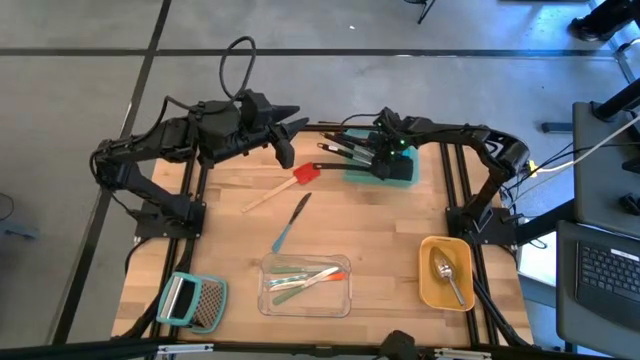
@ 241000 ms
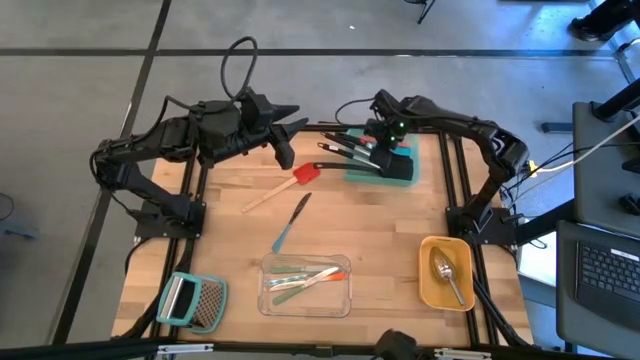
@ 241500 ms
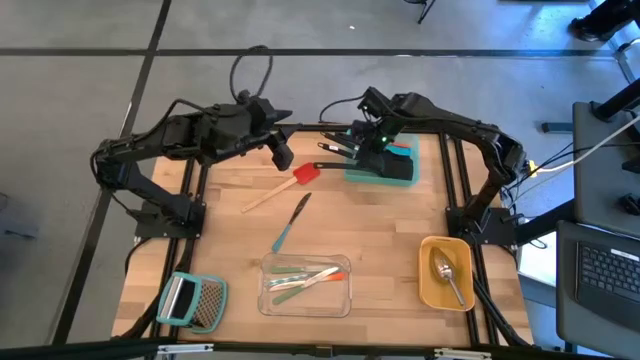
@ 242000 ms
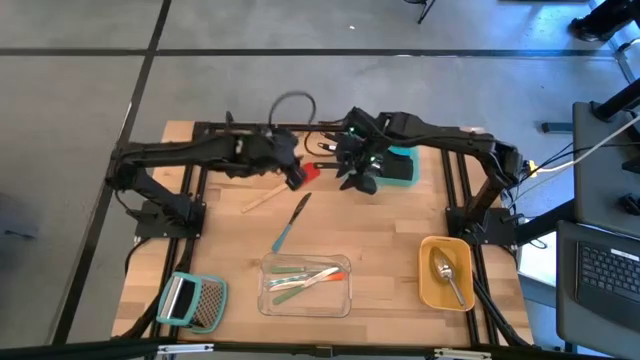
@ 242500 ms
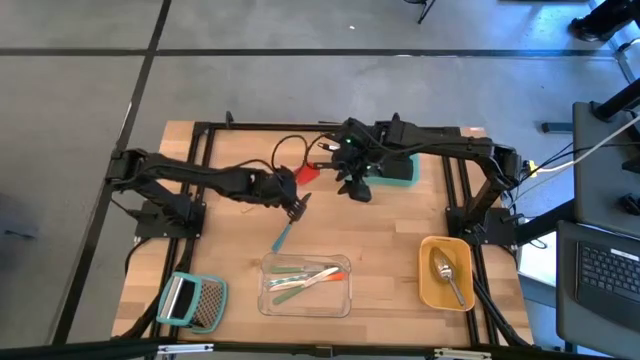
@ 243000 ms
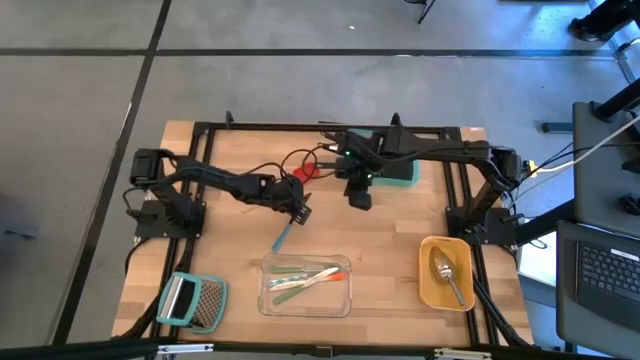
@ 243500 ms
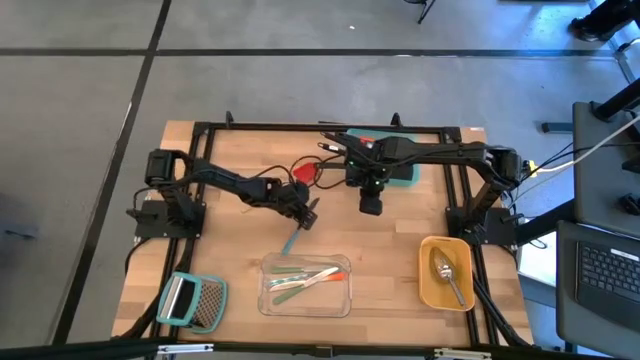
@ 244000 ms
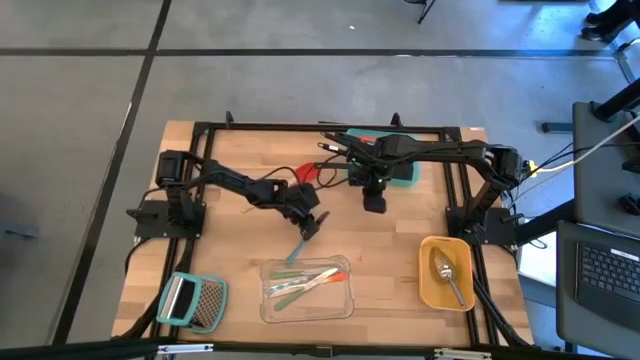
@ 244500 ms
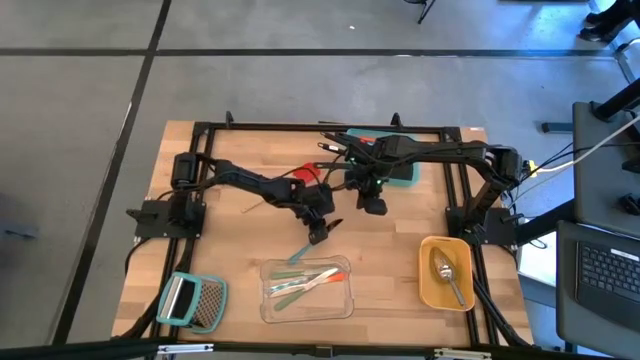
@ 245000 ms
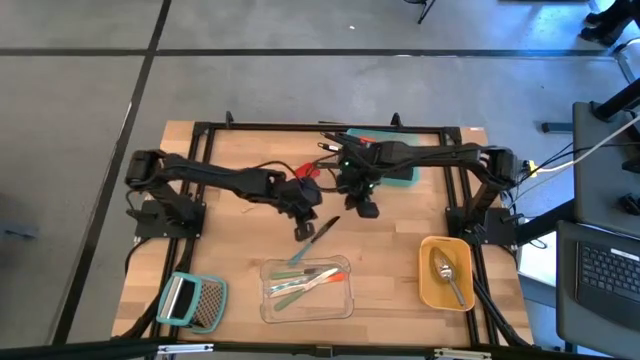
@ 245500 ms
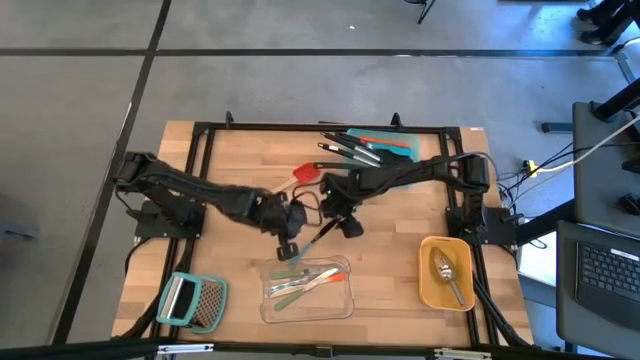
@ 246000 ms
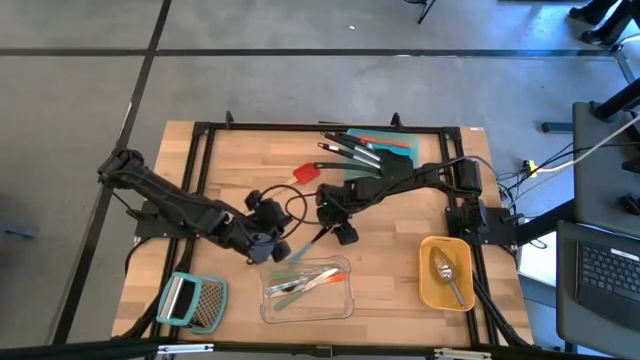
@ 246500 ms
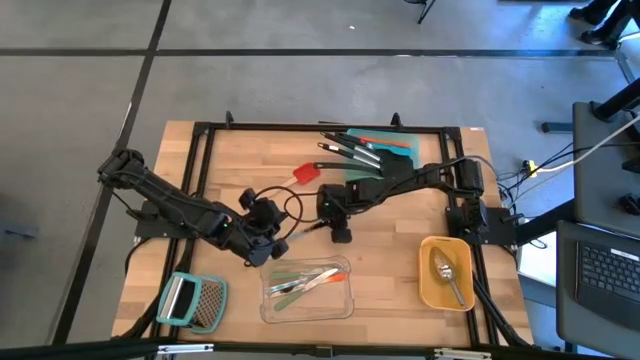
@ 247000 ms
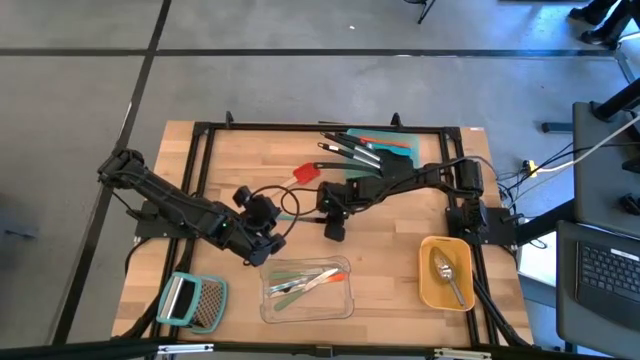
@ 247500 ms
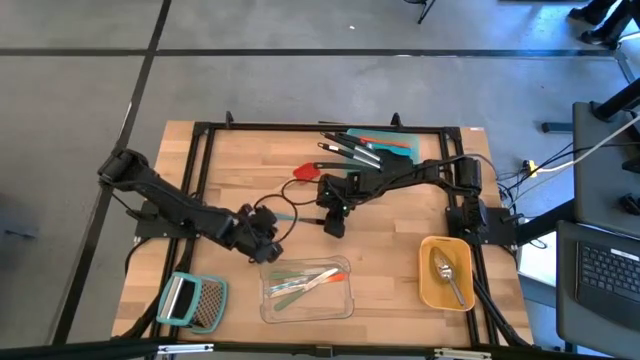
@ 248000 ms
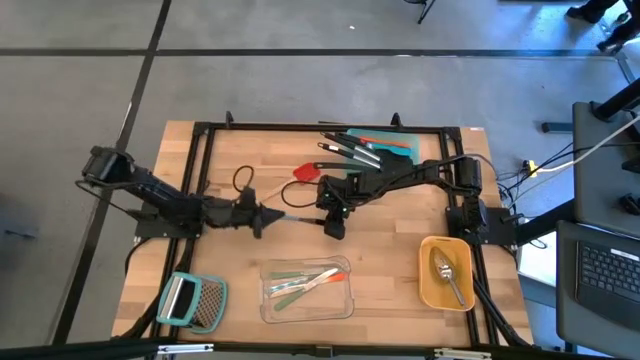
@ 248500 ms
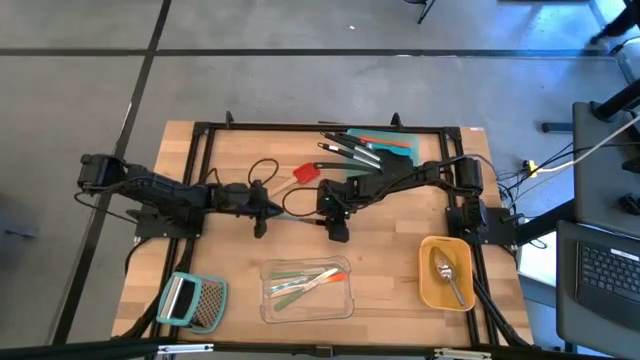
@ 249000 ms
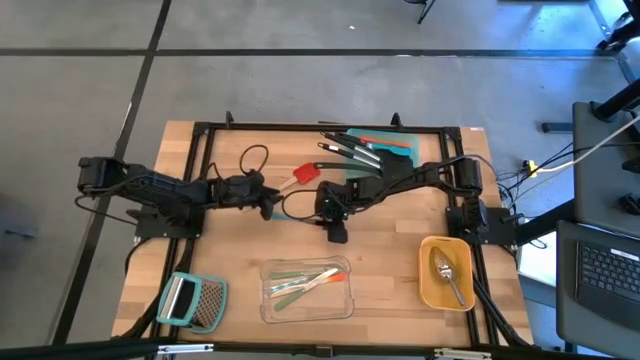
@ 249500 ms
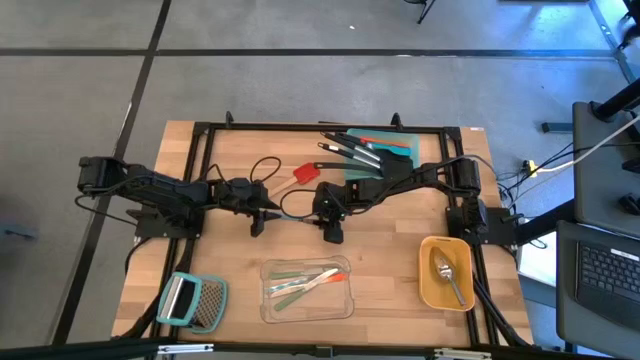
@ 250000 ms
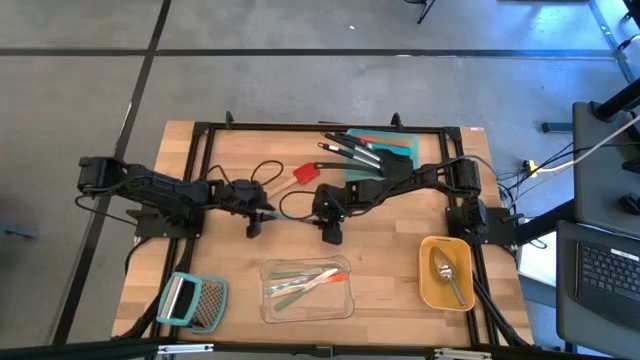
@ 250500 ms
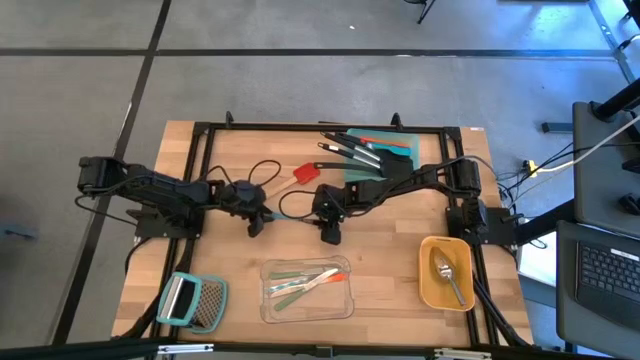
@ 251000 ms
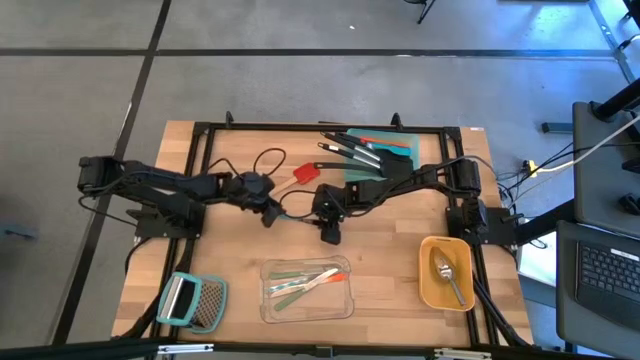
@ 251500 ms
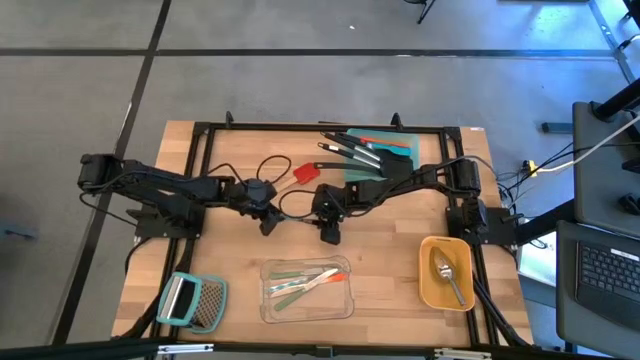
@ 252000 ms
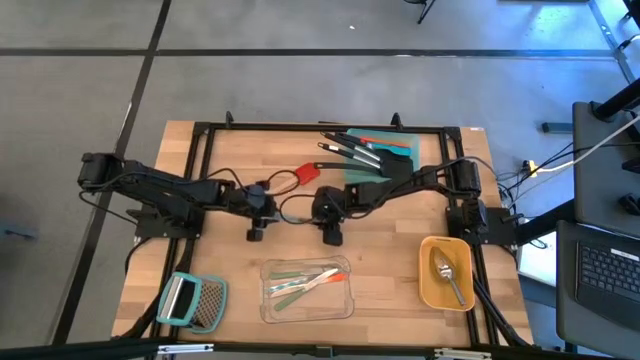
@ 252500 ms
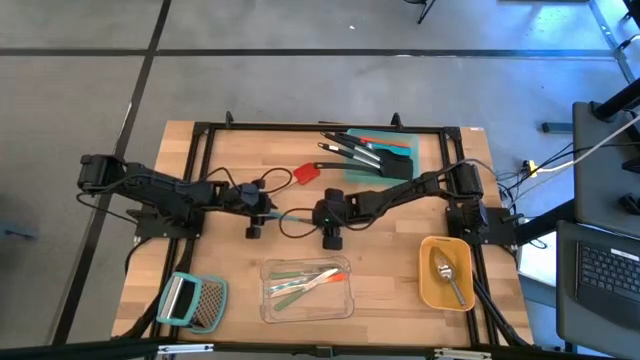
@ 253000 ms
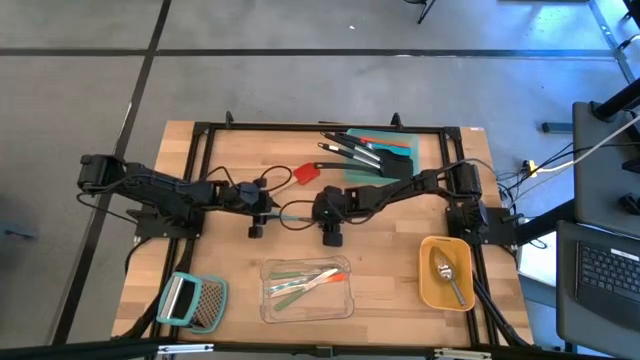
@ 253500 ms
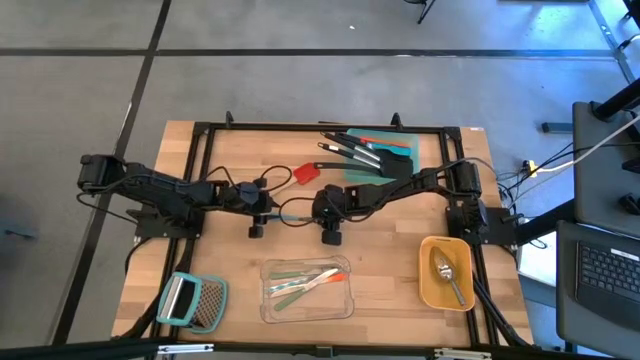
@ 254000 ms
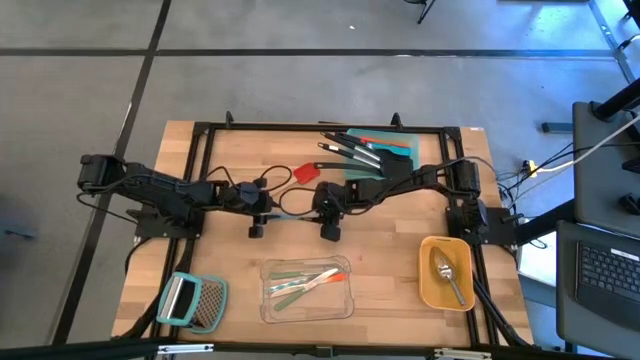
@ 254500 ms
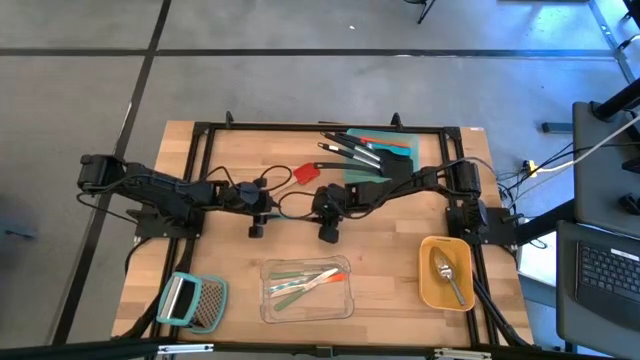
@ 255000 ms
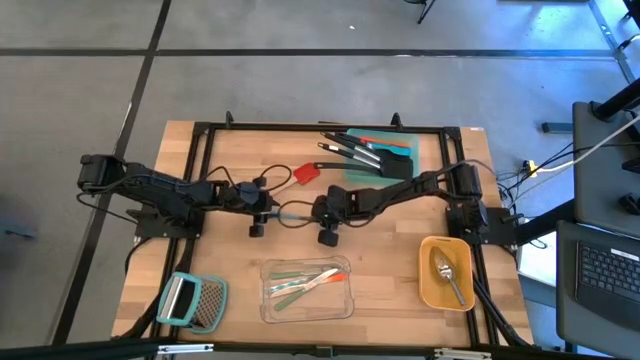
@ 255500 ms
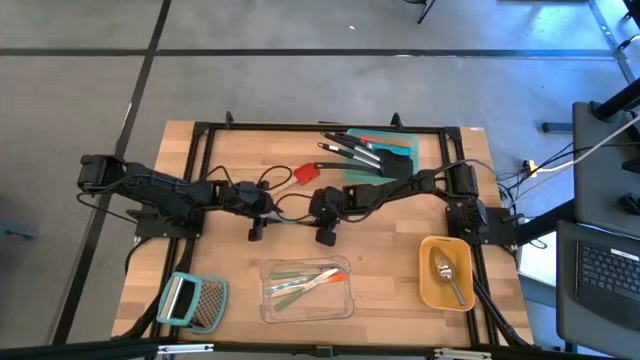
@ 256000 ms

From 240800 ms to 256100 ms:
Task: Pick & Place Kitchen Items
Put the blue table knife into the transparent bin

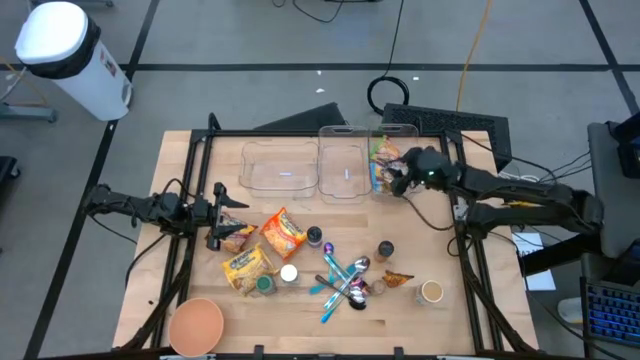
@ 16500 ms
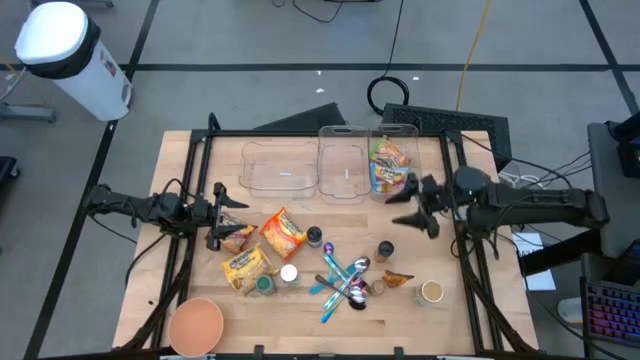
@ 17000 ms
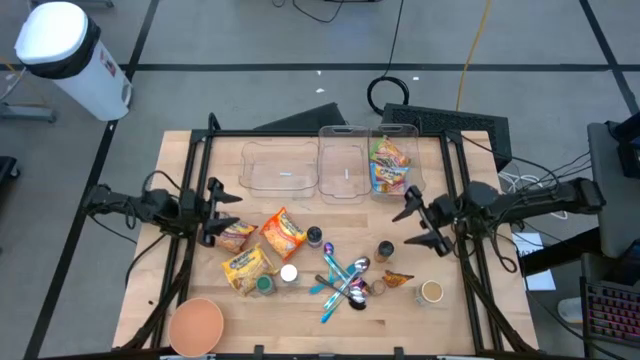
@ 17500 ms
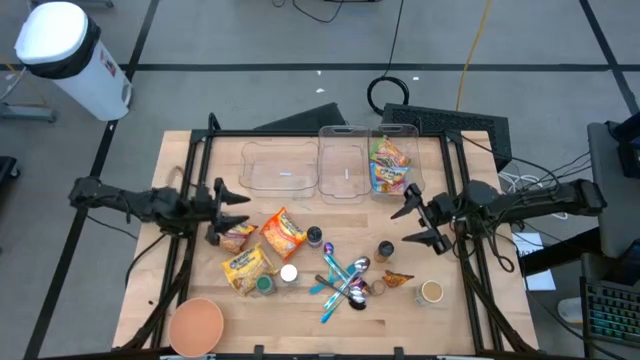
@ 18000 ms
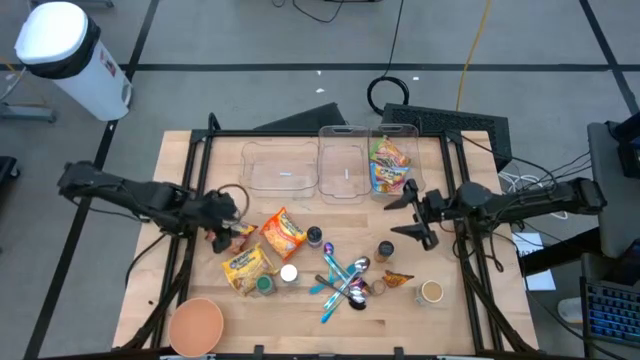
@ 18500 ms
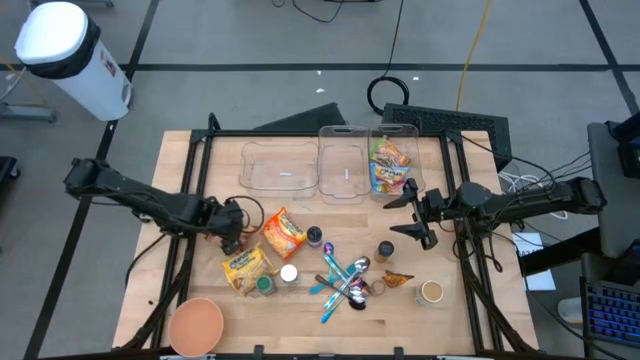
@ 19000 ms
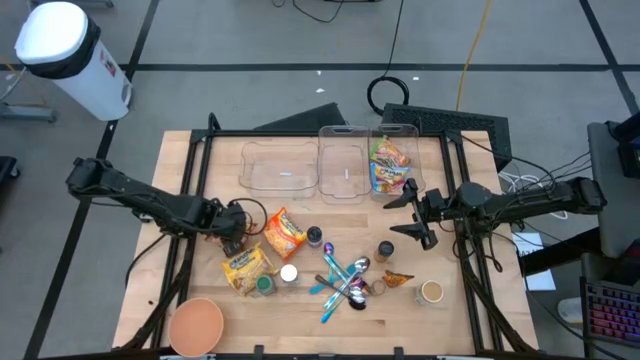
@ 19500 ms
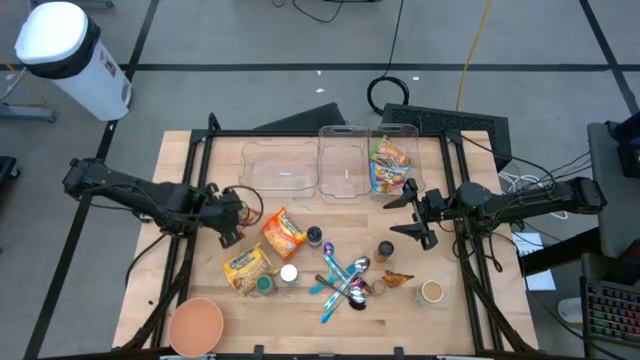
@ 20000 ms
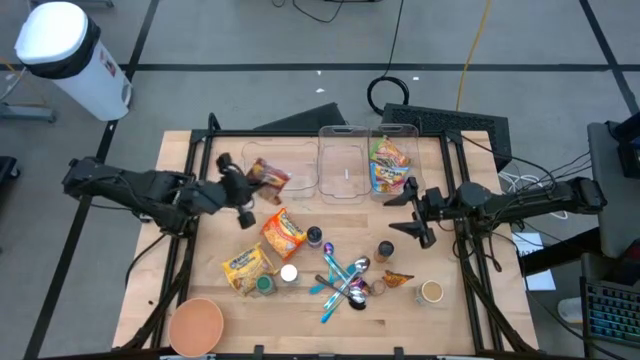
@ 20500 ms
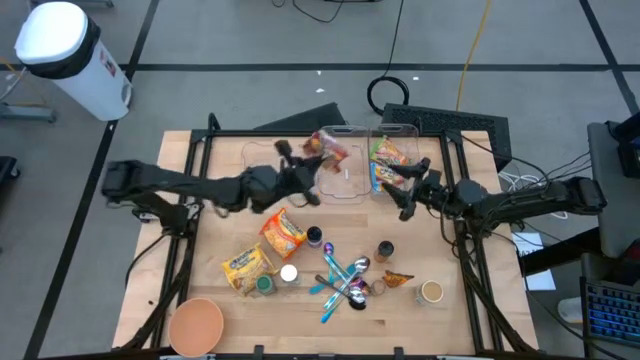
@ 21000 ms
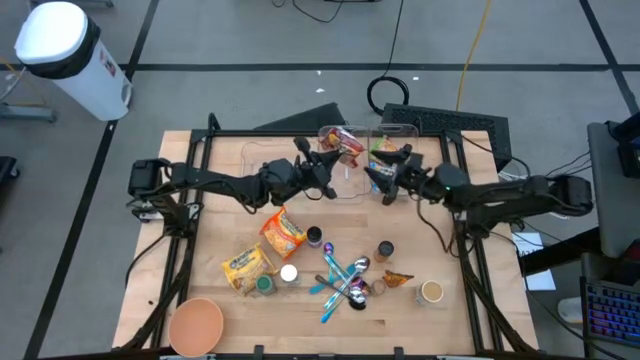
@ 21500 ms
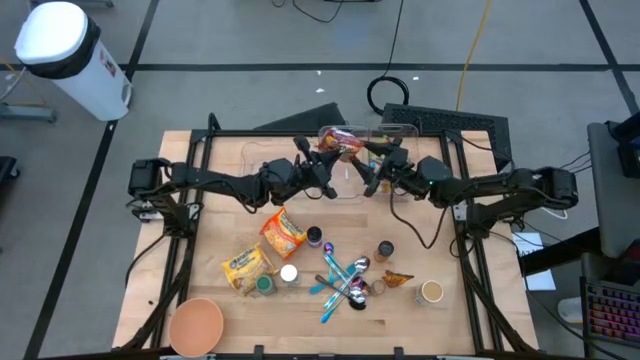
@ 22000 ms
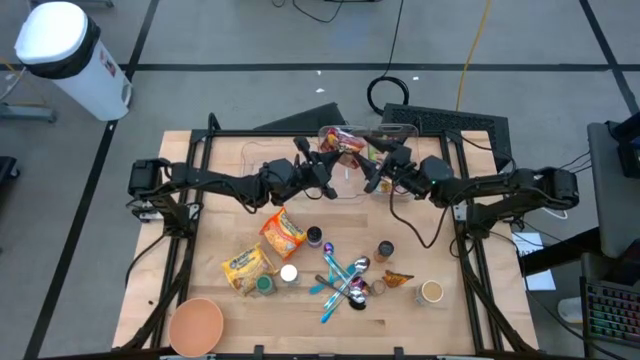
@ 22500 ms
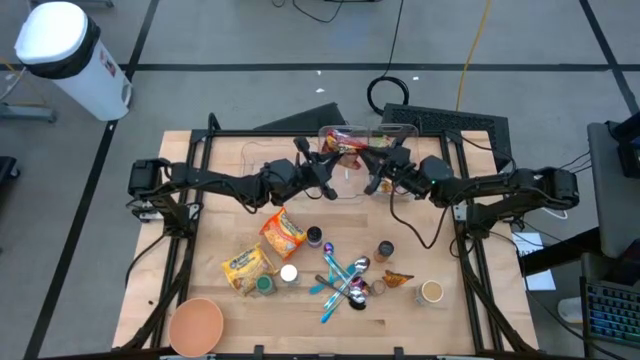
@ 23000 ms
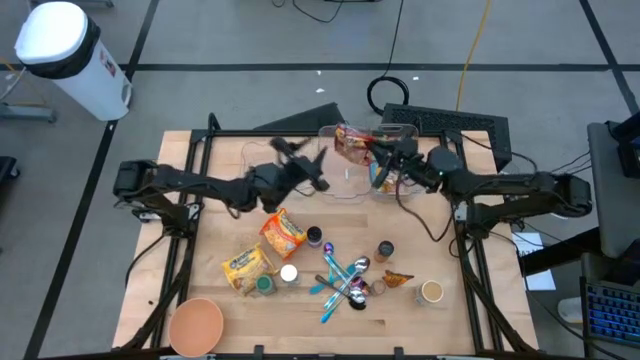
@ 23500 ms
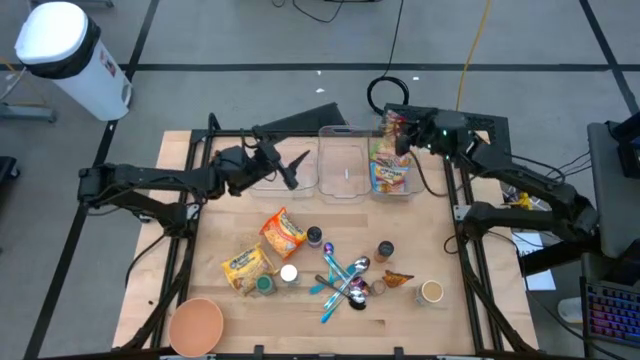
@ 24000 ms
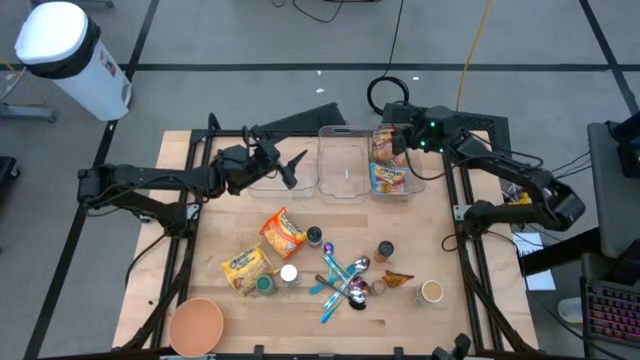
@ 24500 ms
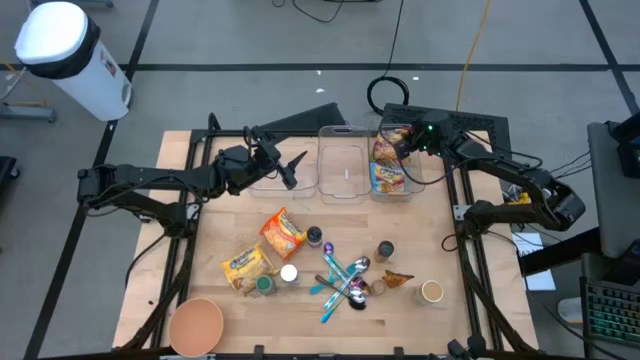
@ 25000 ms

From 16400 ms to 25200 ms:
Task: Pick & Place Food Item
Put the red noodle pack into the right transparent bin
